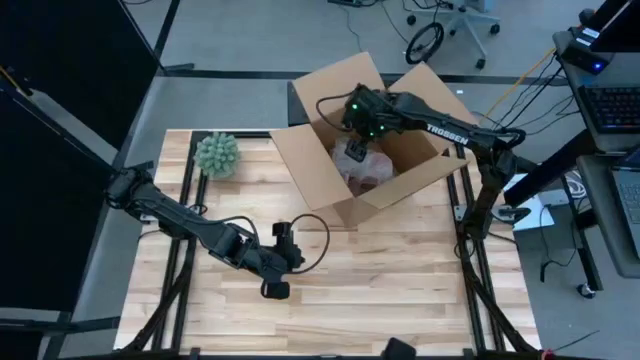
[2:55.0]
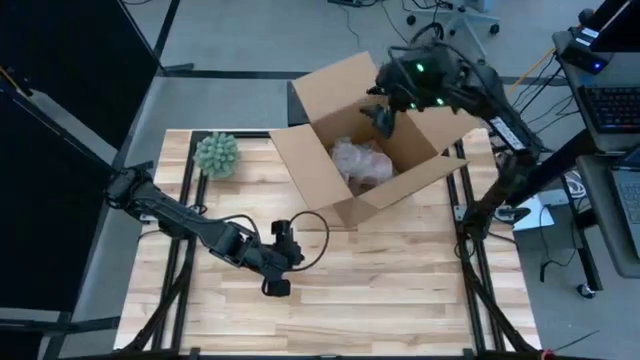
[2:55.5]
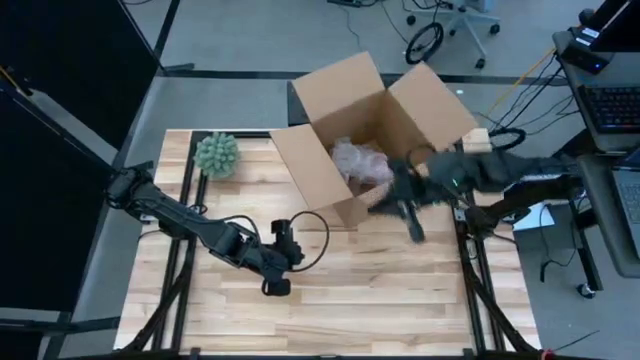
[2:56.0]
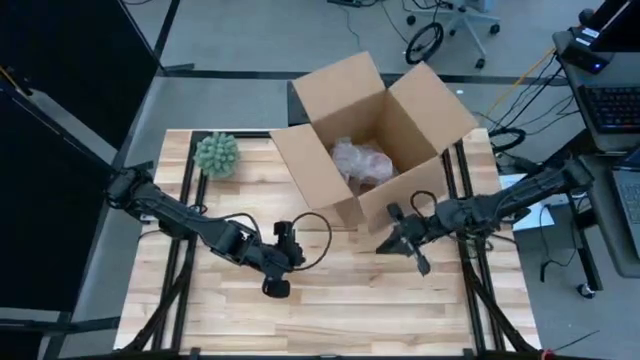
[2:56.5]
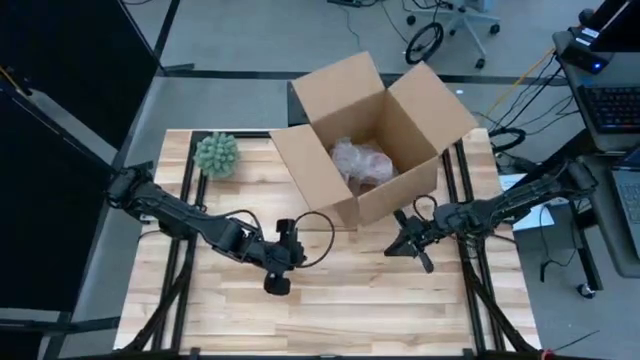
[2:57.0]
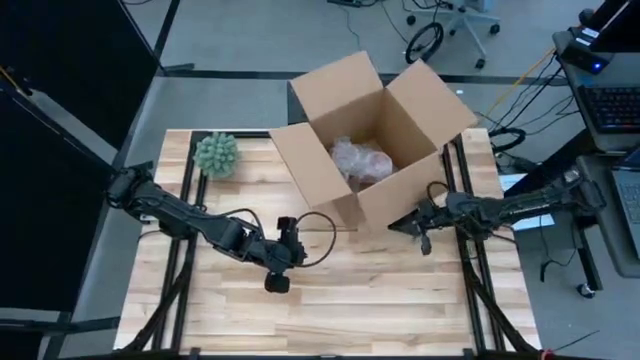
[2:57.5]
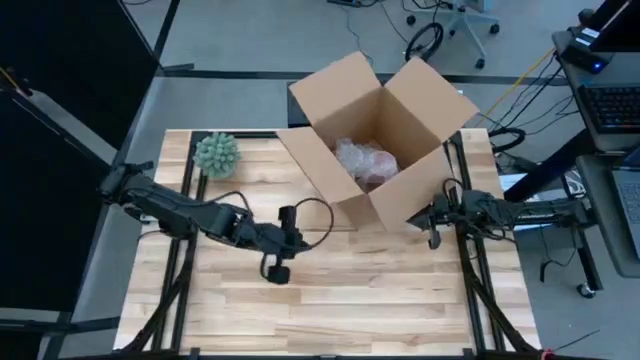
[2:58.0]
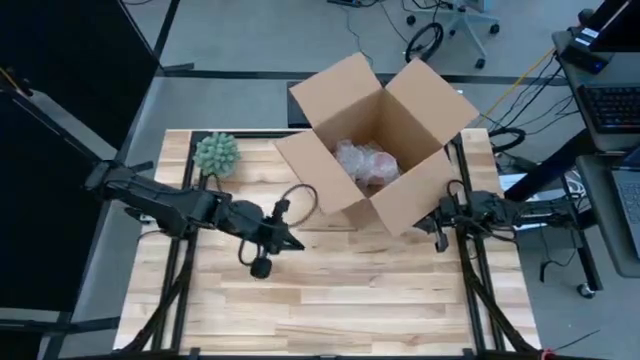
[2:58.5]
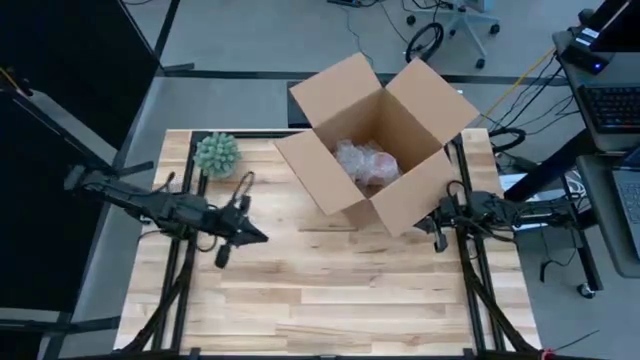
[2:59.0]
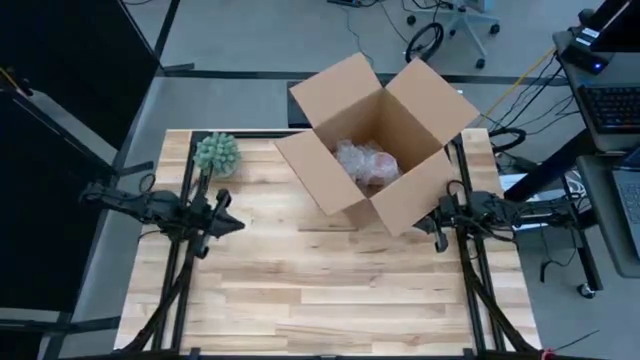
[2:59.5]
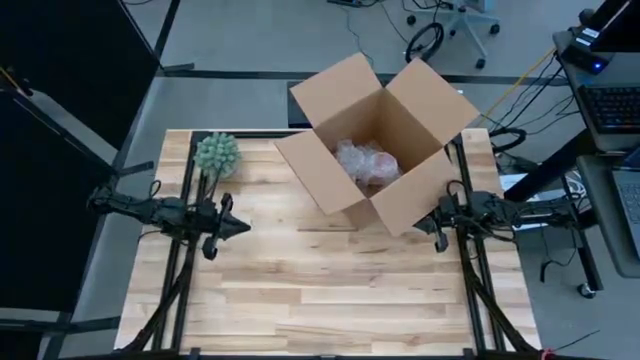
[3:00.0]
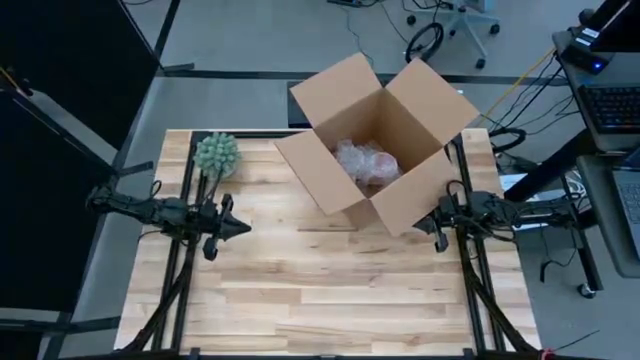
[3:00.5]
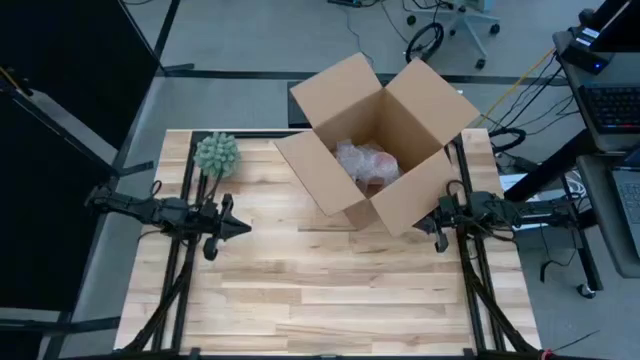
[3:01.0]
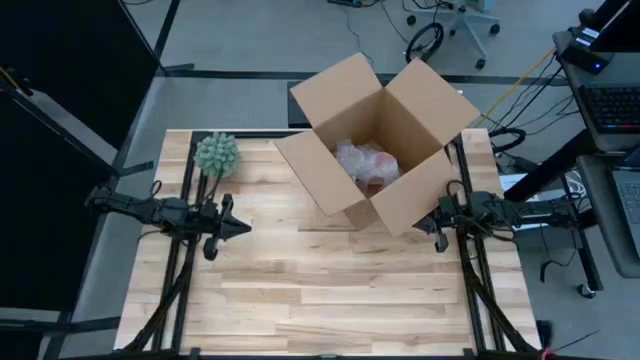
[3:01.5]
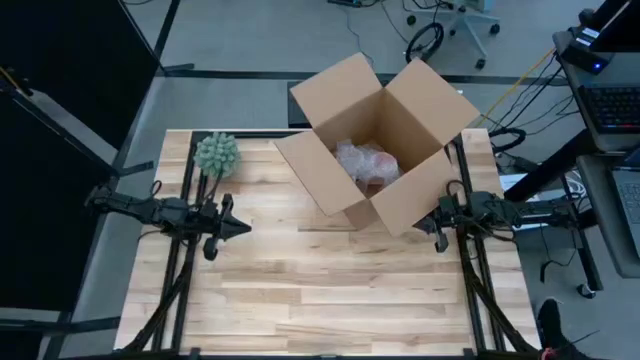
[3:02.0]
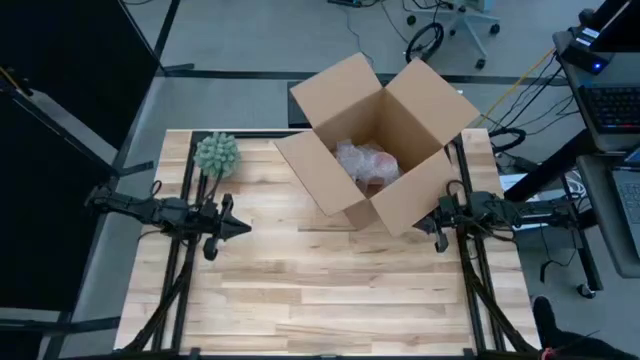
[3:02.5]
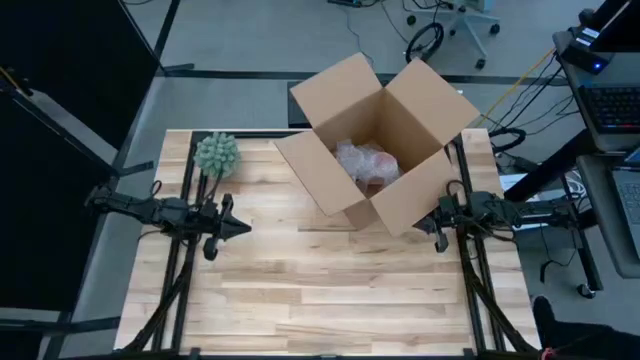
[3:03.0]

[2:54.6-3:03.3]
Task: wrap mug
Return to Home Position

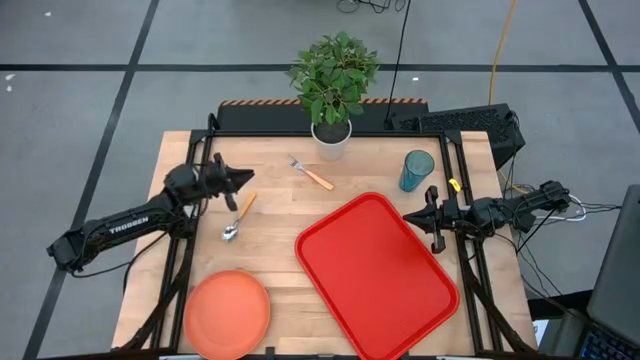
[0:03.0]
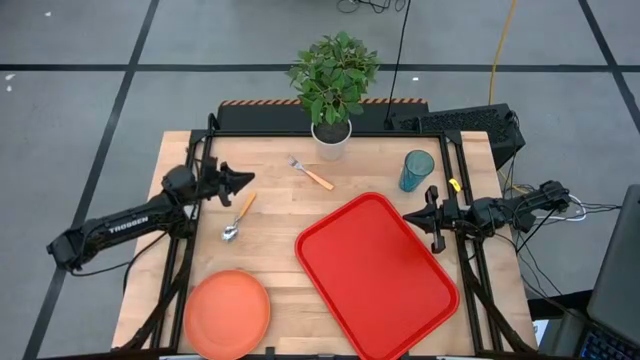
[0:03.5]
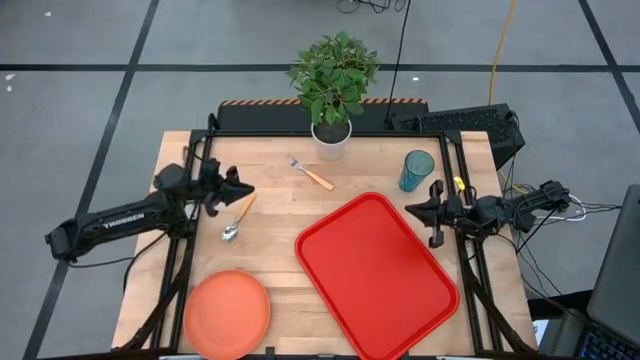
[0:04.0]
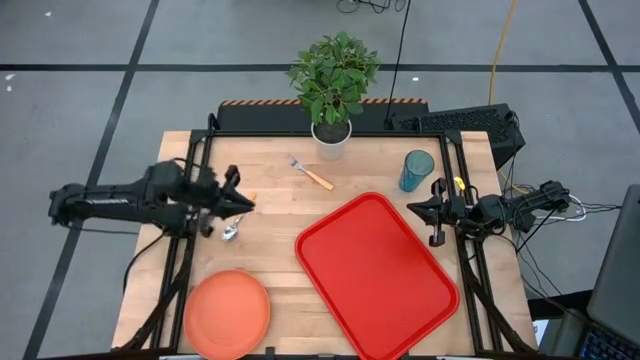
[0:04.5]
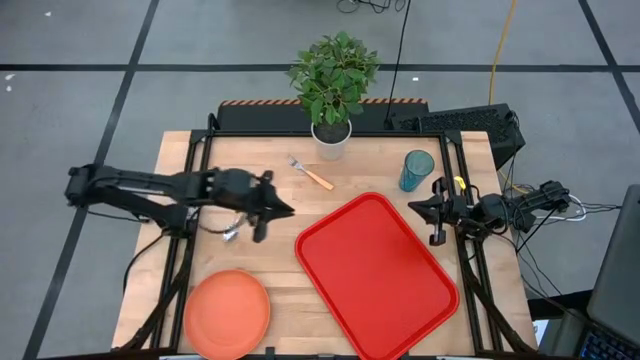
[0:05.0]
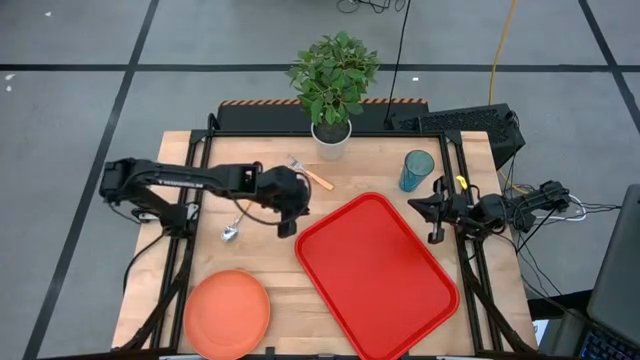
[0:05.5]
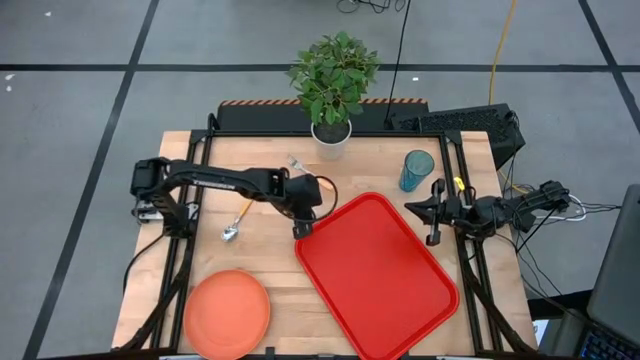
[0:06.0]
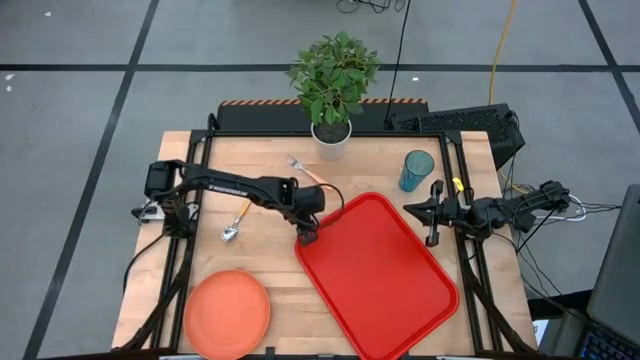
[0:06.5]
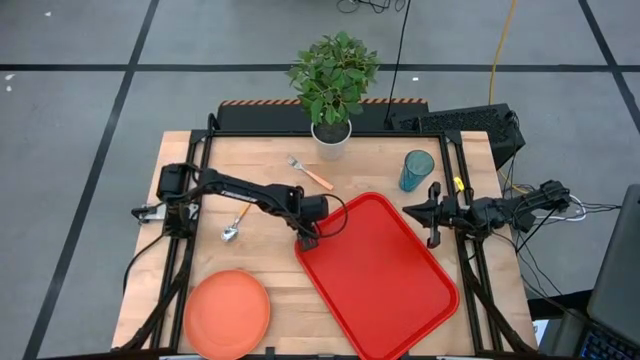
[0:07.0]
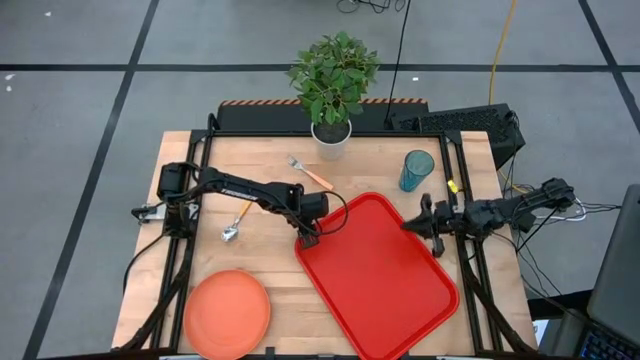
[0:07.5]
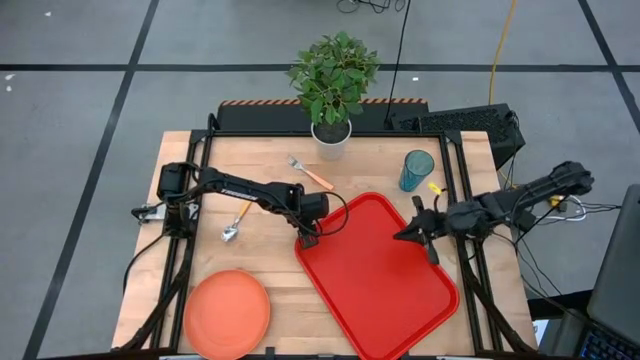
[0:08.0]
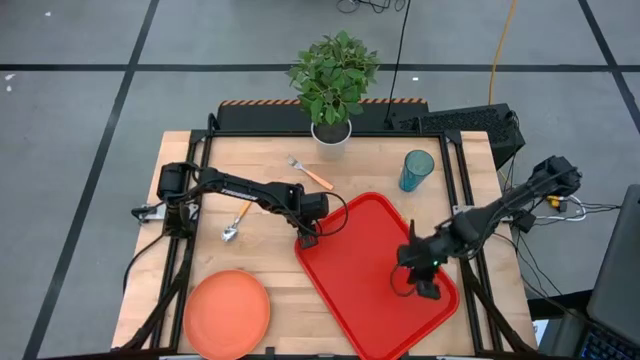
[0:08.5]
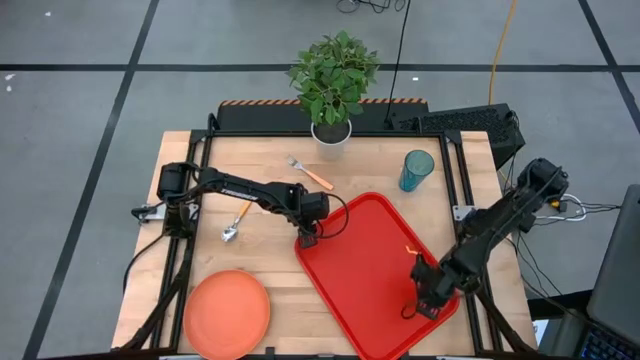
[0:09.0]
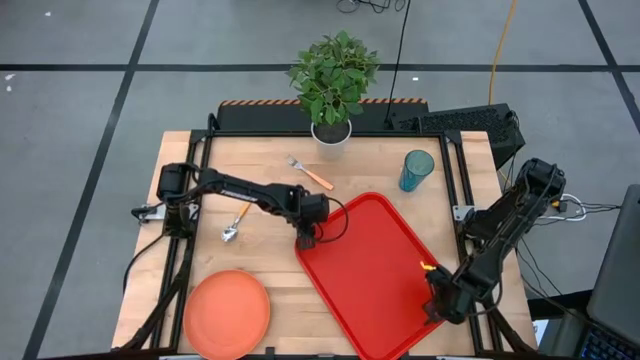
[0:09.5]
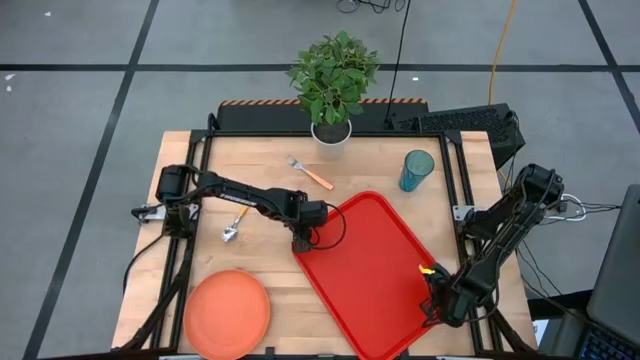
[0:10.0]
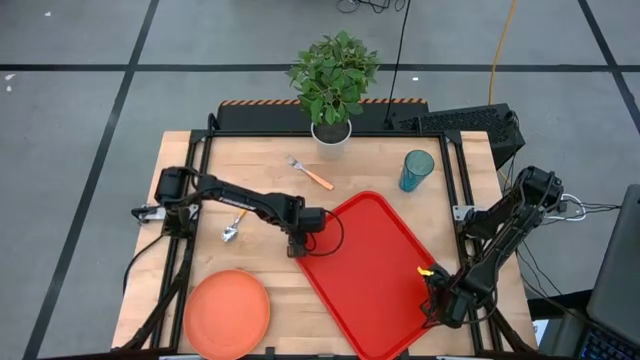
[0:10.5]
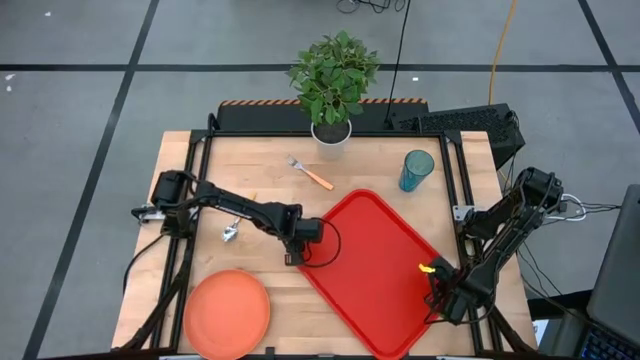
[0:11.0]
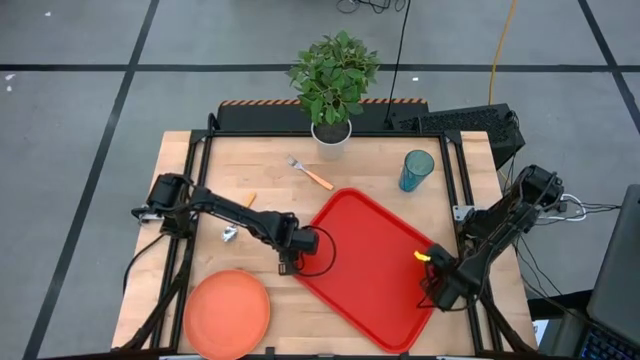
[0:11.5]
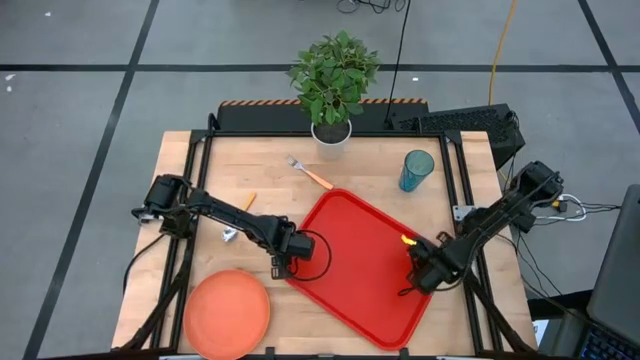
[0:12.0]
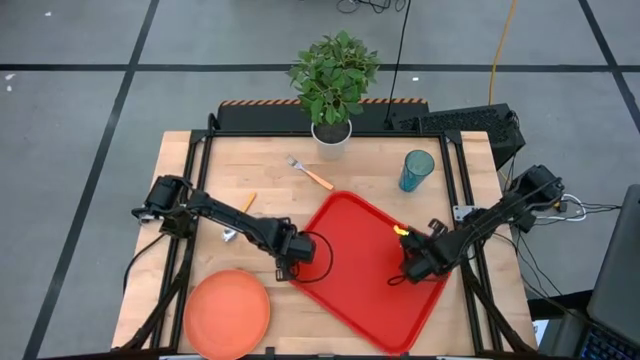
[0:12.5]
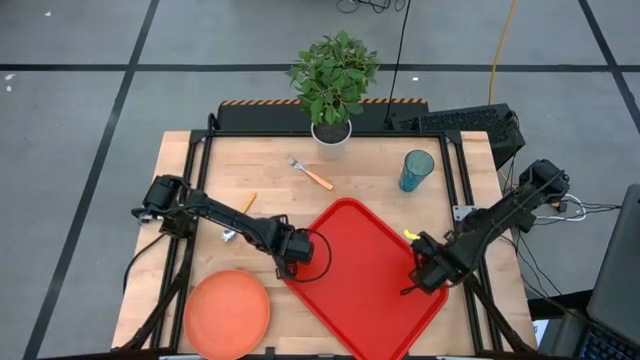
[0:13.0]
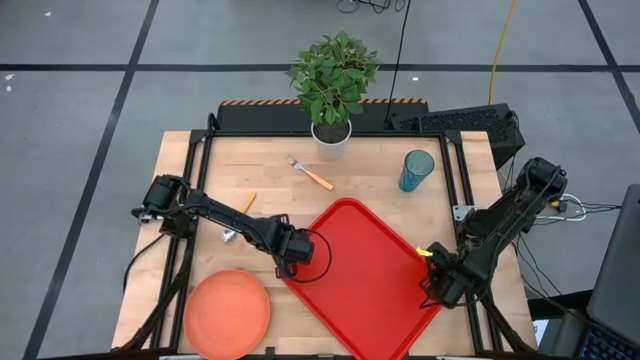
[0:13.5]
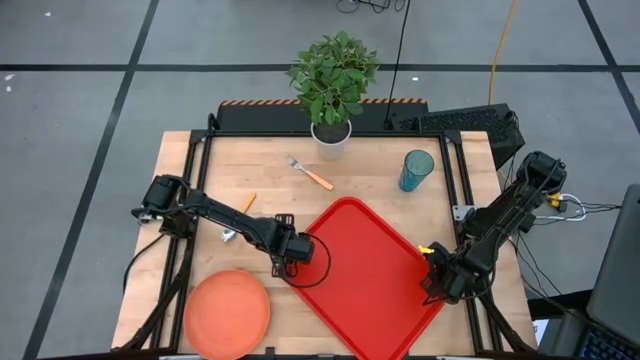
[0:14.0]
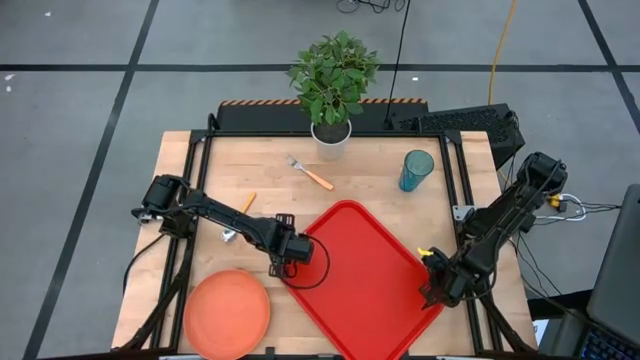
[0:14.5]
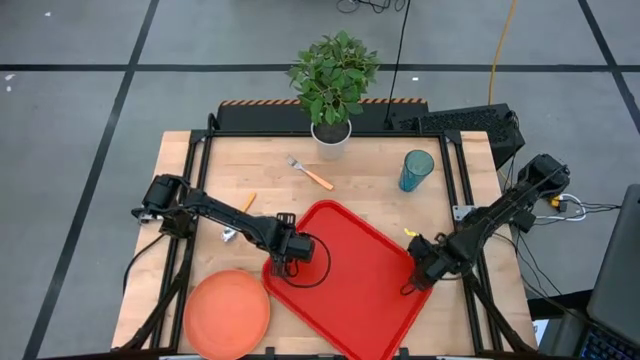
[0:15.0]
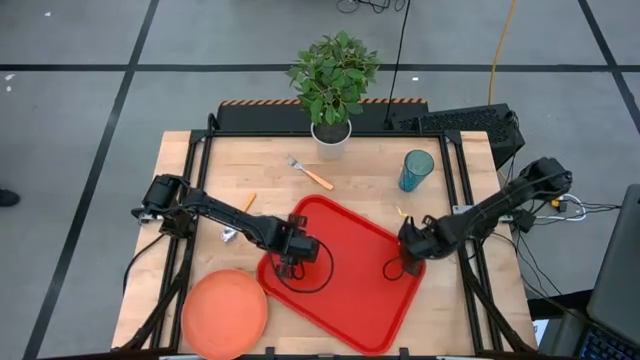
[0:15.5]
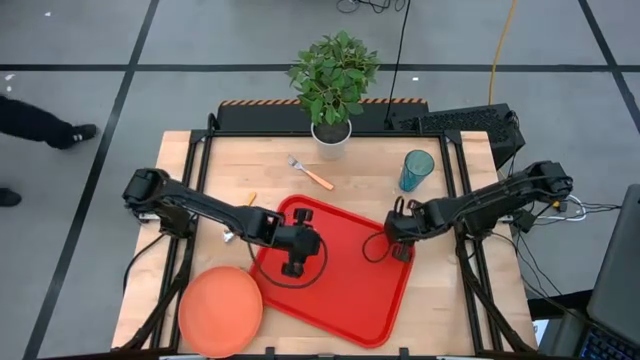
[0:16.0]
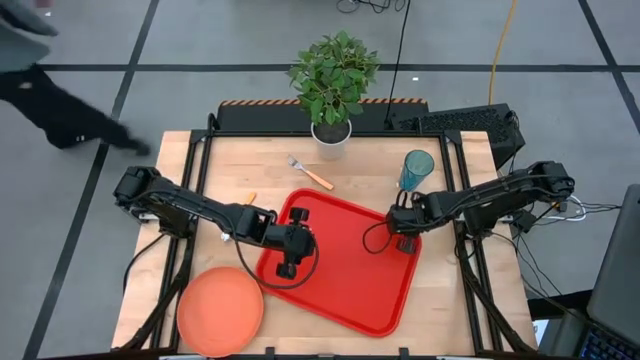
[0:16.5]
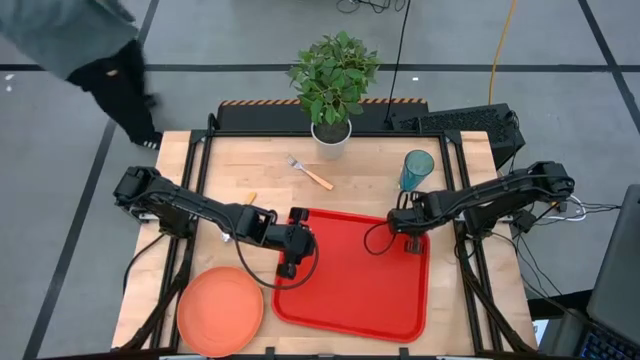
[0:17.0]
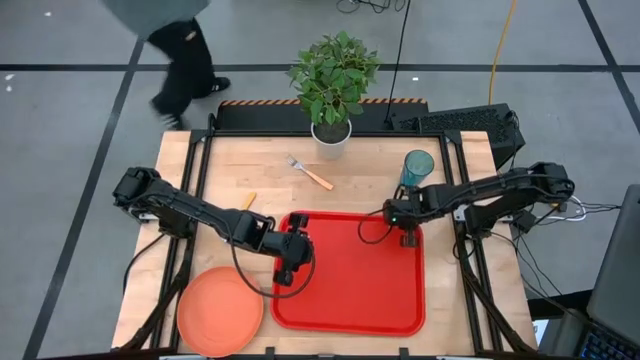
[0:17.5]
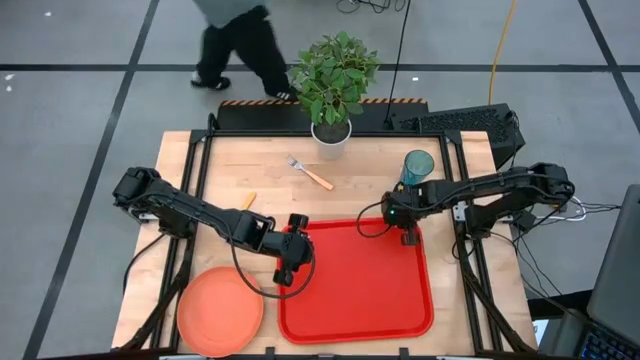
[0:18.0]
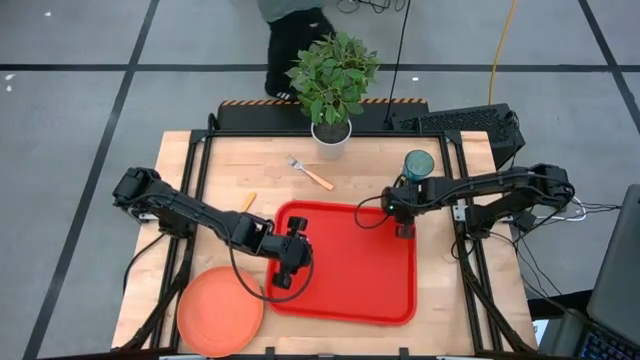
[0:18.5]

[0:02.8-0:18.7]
Task: Pick and place plate/cup/fork/spoon on tray
Move the red tray to the center of the table
